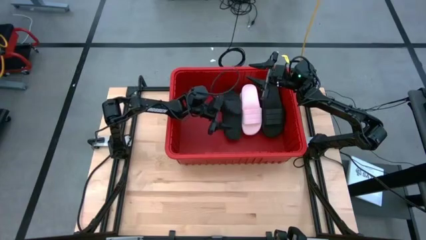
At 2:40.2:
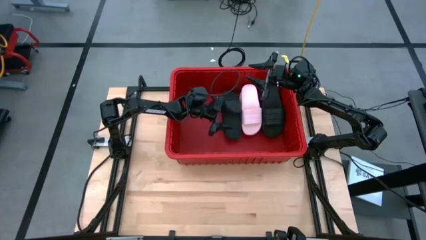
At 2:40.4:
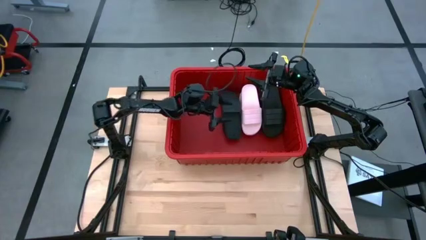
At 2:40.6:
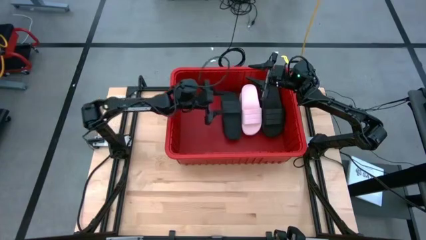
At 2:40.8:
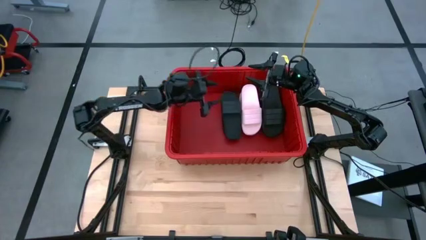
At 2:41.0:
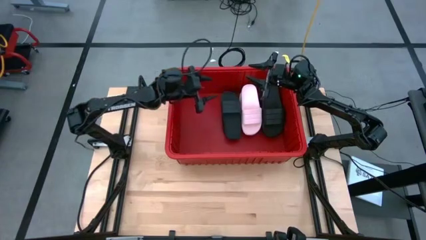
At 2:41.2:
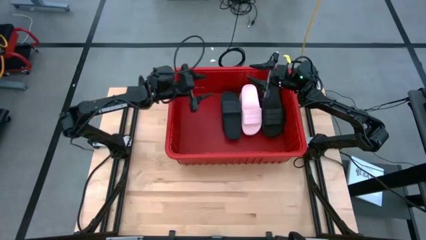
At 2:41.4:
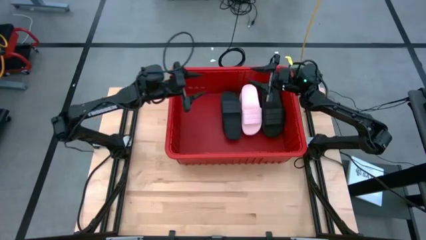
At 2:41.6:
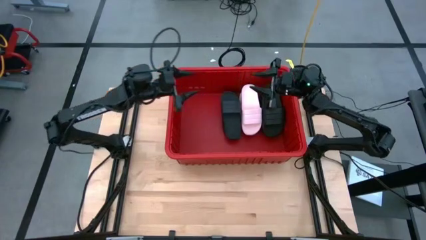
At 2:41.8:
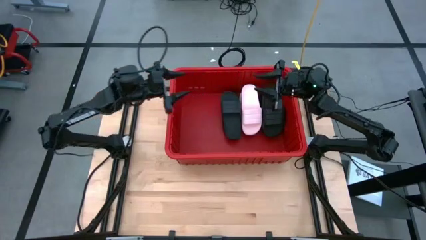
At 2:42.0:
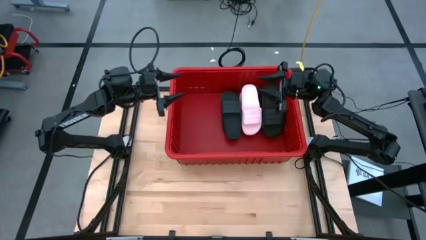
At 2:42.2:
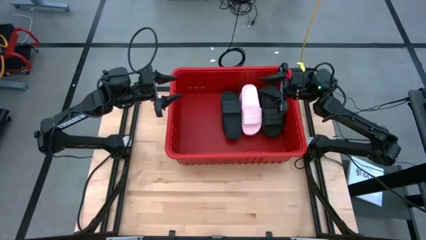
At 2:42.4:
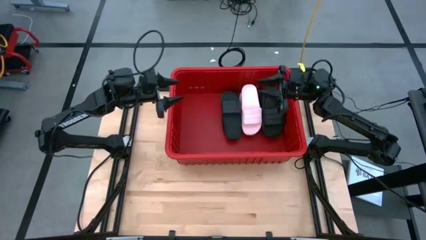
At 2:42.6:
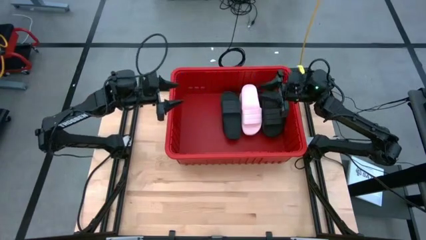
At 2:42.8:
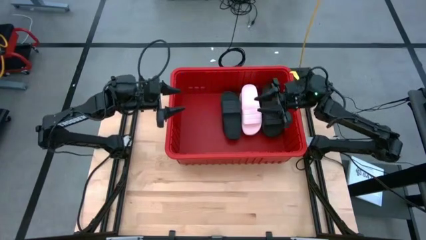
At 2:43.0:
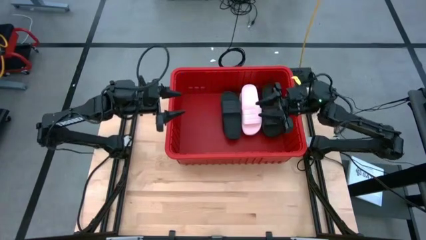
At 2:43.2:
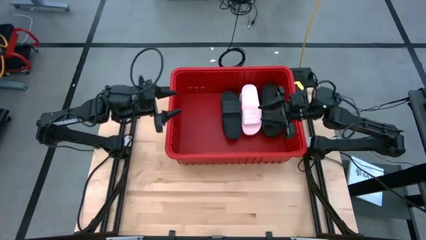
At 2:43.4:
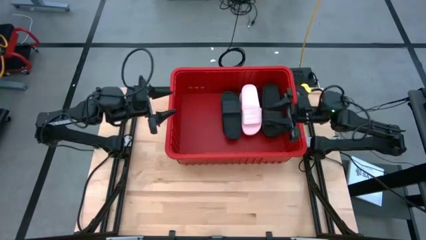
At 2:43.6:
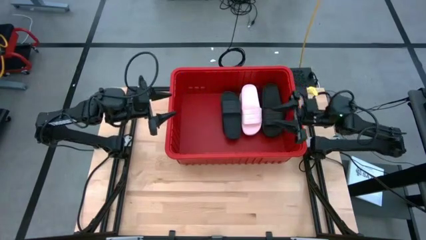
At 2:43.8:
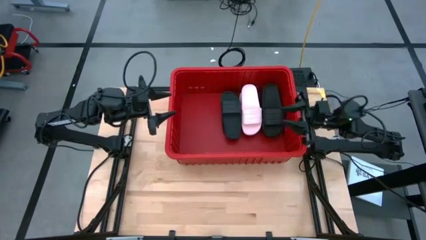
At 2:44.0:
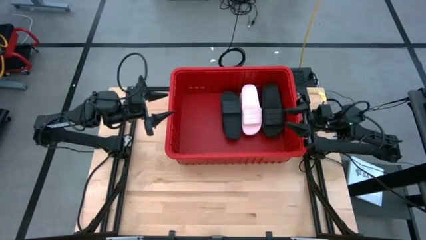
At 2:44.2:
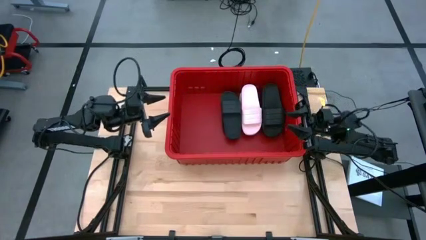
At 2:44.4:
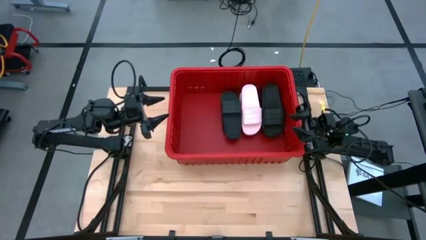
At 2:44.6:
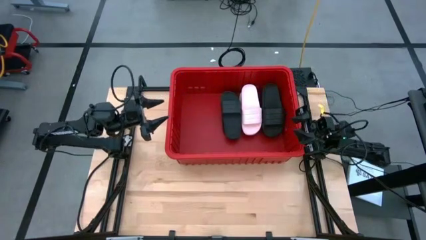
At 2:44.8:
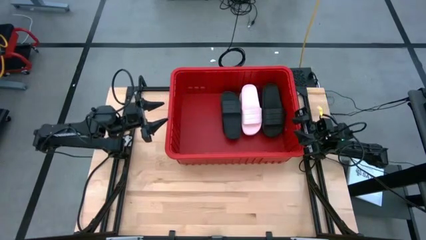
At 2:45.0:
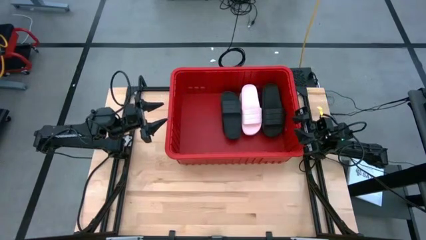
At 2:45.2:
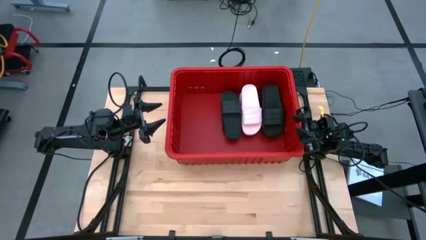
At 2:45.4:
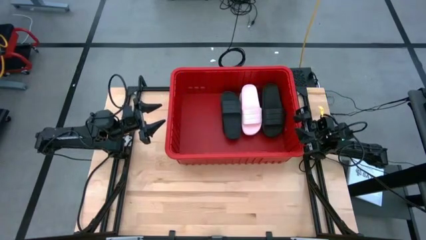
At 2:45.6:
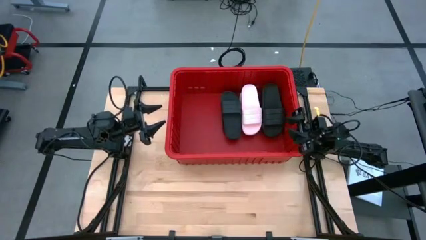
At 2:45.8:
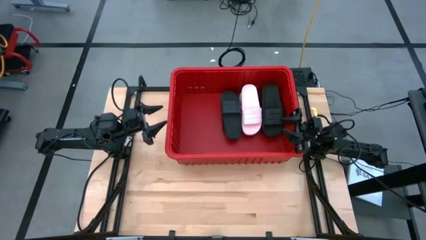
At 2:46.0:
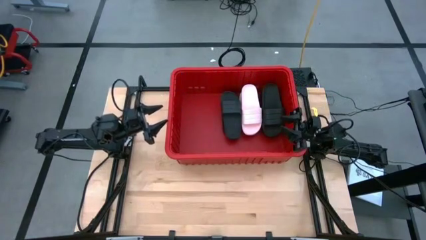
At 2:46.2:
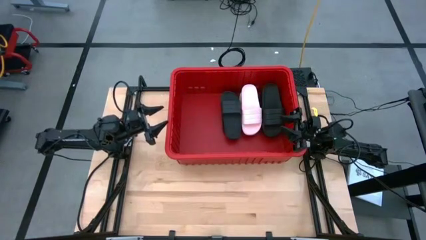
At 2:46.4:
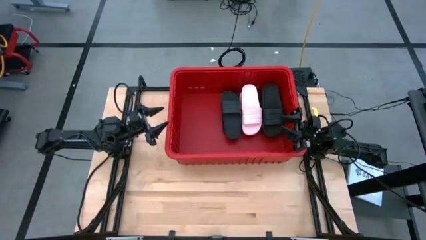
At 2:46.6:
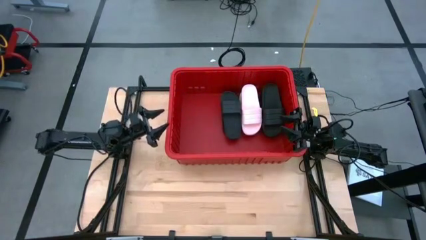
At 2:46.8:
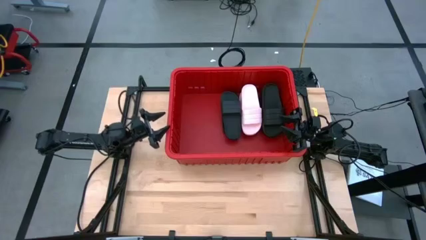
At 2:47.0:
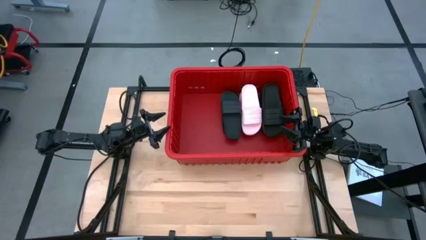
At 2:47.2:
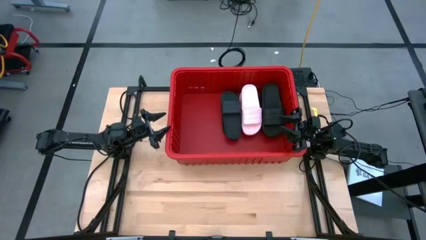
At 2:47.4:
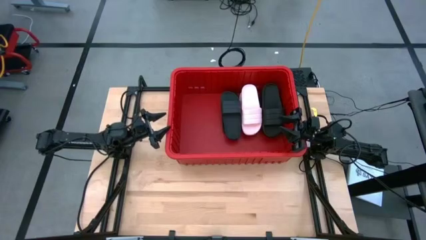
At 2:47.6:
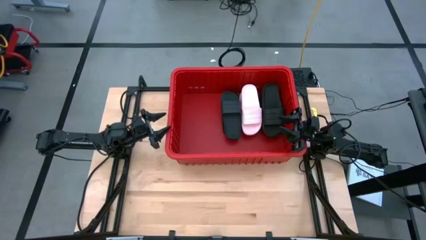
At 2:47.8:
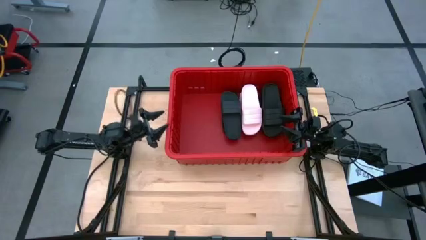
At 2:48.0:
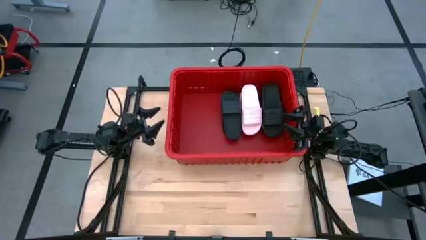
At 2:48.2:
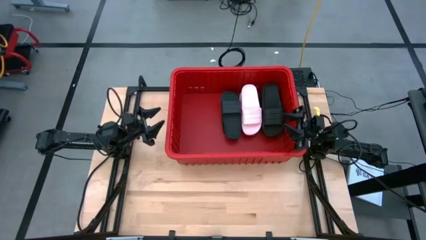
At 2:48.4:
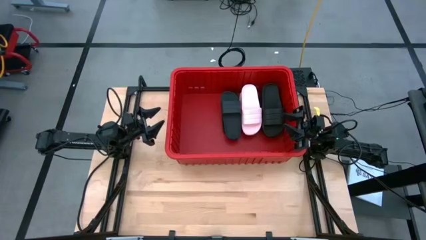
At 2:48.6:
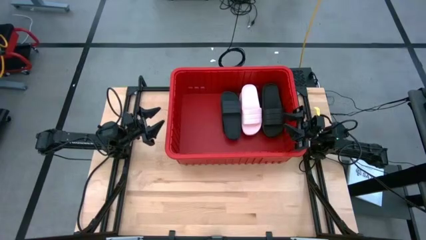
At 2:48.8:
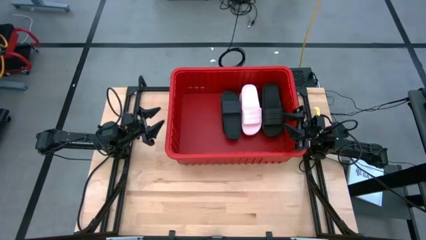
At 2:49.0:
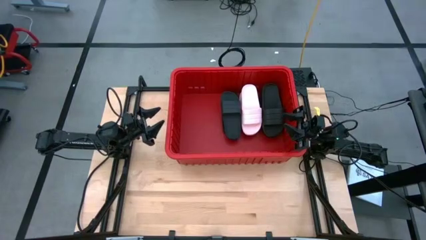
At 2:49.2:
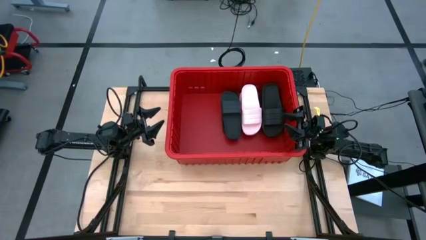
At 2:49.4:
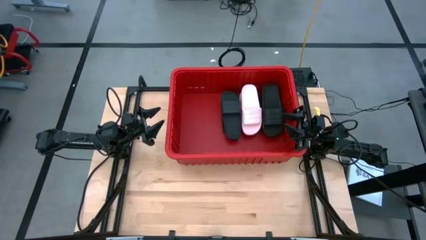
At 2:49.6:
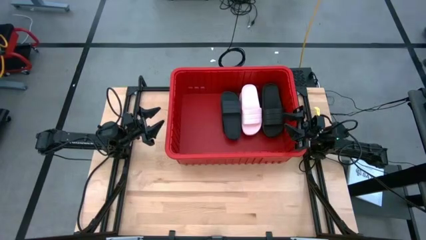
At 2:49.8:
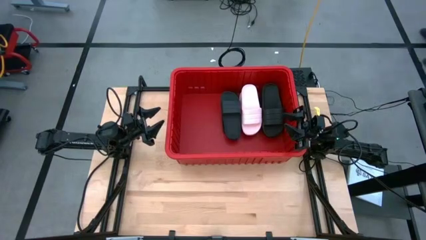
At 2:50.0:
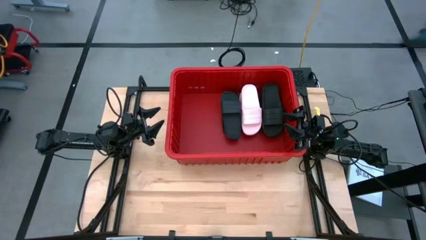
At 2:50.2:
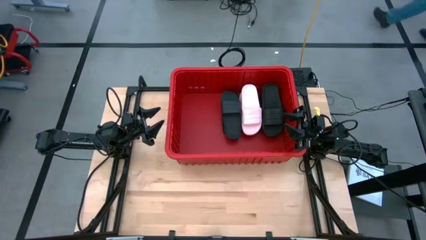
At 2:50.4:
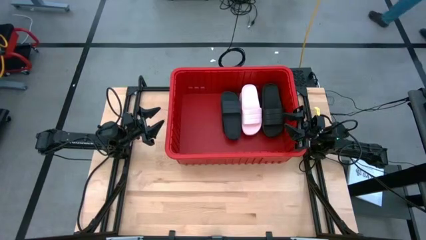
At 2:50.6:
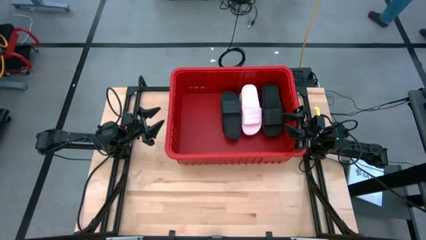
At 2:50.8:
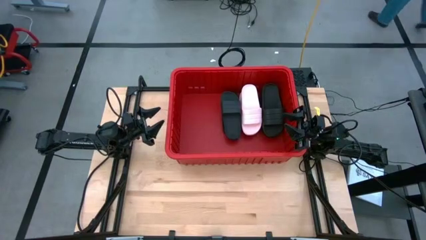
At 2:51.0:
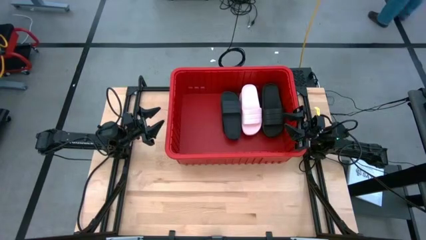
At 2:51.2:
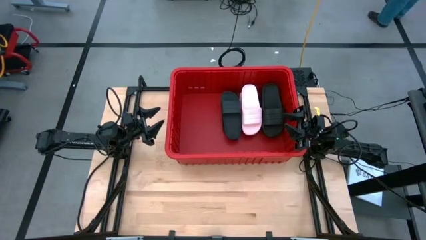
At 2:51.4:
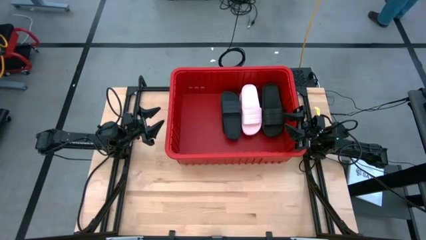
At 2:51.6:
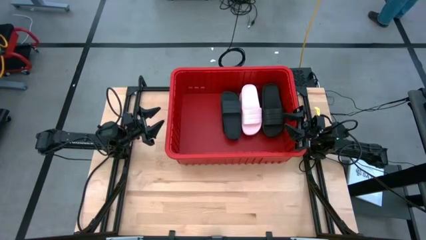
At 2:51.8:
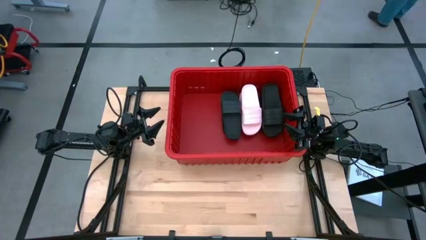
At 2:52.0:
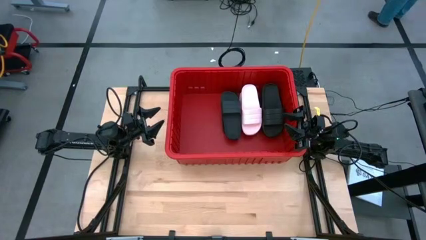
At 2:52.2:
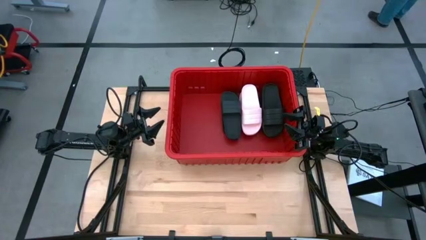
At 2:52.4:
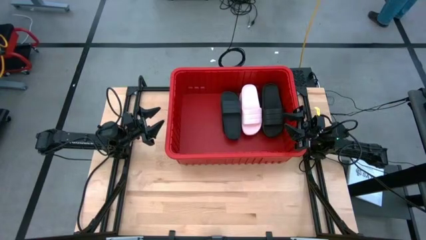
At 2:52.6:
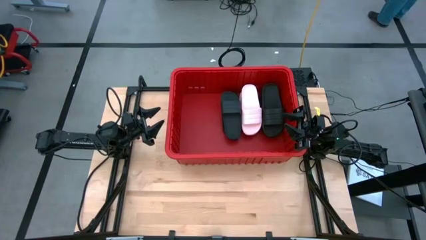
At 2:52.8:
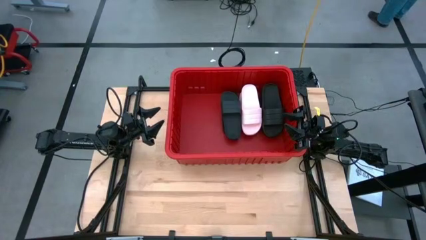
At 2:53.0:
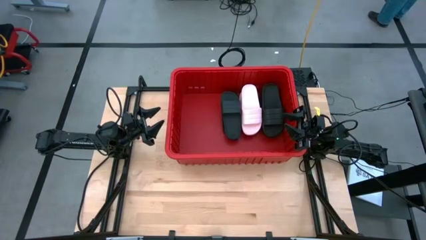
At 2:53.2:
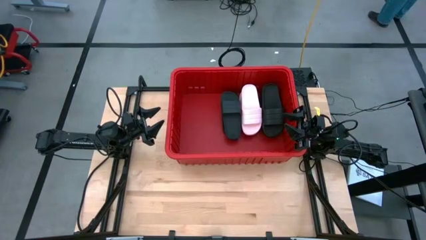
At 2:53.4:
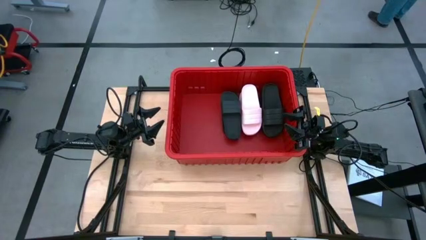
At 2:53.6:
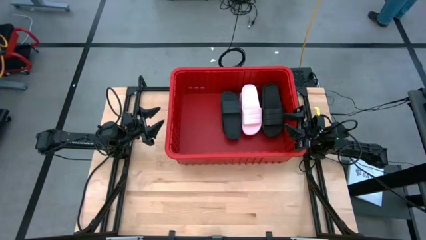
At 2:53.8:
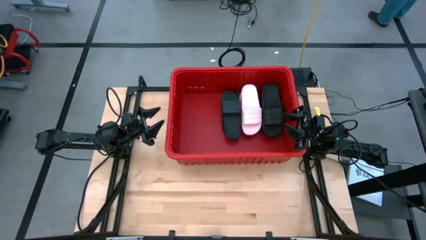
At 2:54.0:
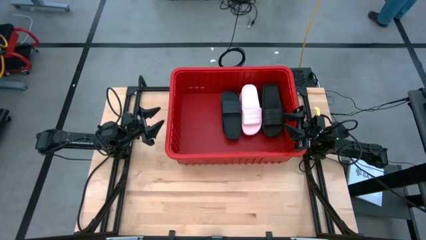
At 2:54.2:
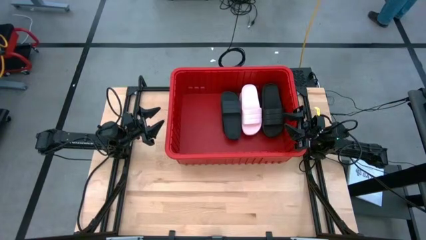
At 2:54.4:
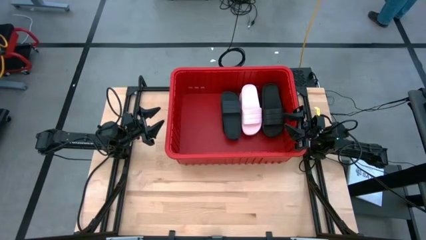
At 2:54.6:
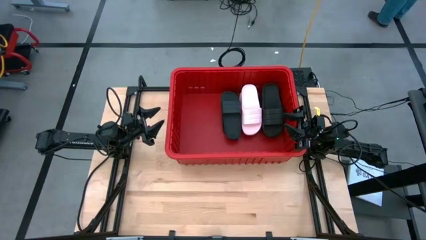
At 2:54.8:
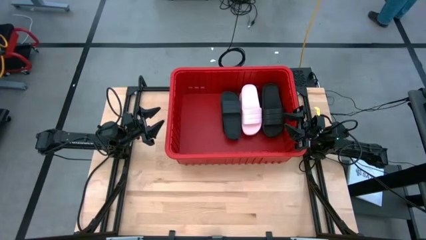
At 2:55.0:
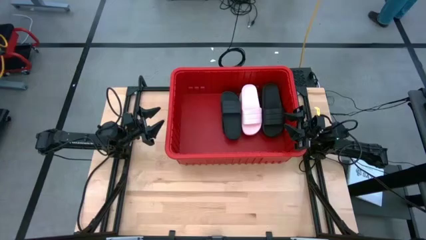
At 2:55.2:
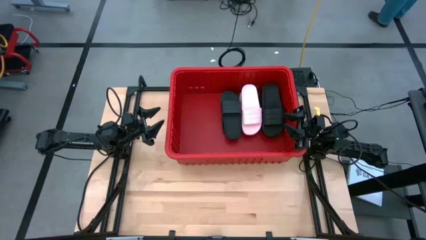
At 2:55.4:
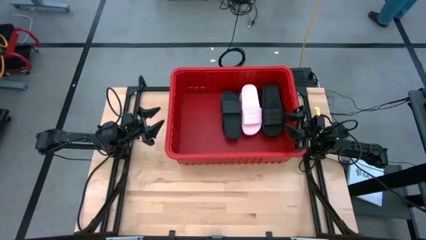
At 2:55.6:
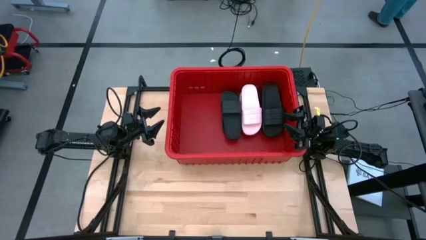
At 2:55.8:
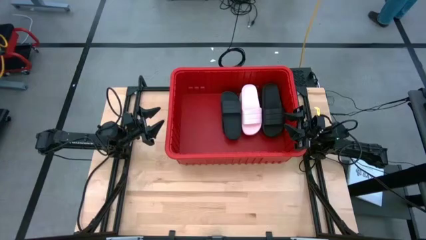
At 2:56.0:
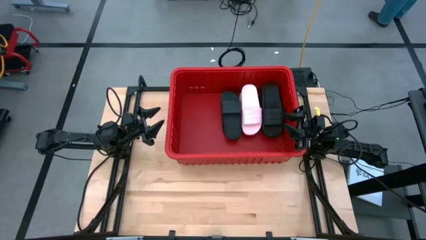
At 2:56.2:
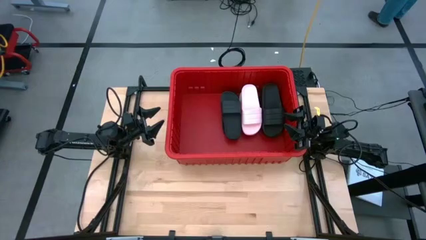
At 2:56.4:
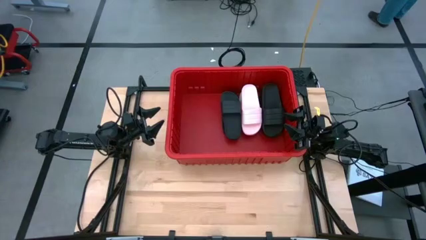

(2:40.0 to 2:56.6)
Task: Pick and place slides into bin
Return to Home Position
